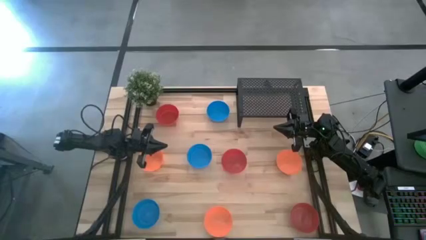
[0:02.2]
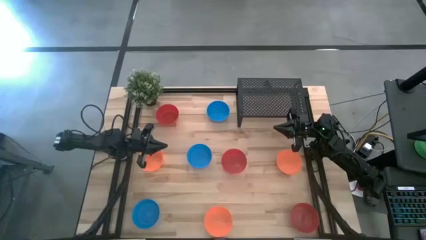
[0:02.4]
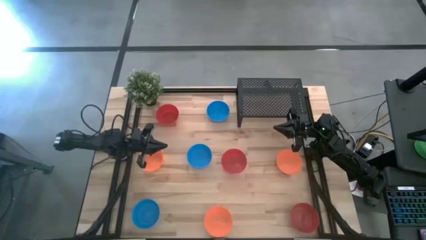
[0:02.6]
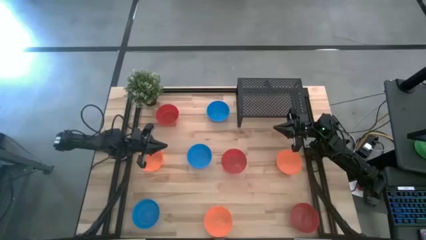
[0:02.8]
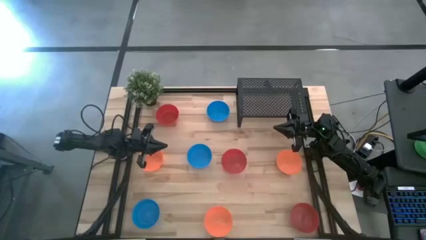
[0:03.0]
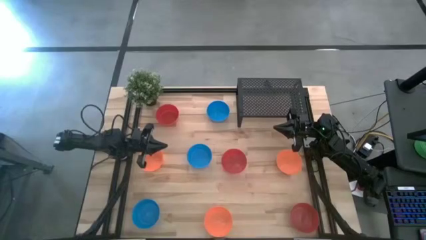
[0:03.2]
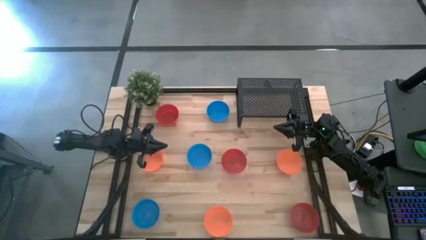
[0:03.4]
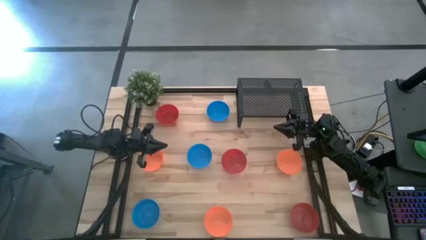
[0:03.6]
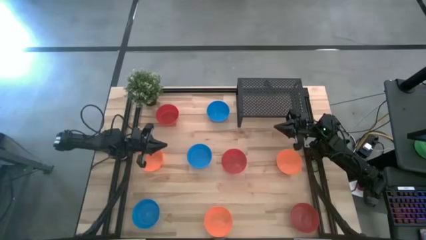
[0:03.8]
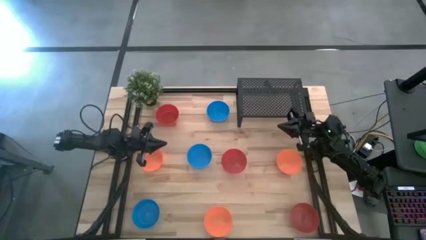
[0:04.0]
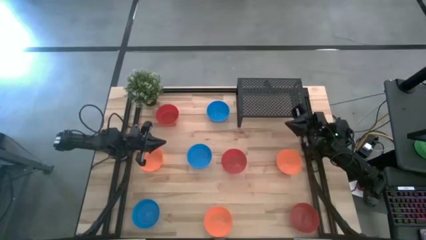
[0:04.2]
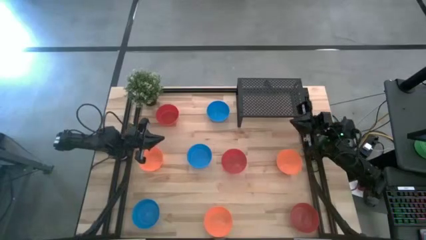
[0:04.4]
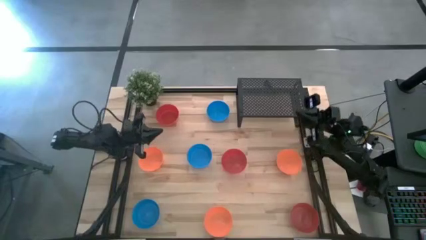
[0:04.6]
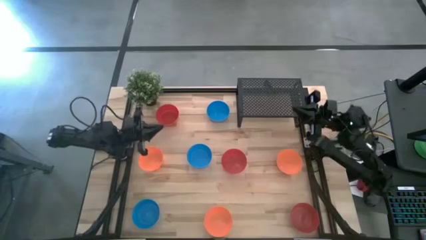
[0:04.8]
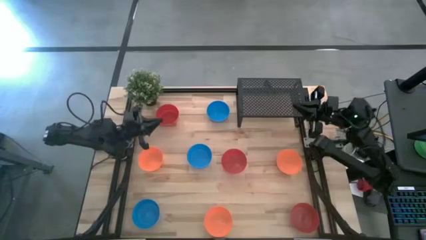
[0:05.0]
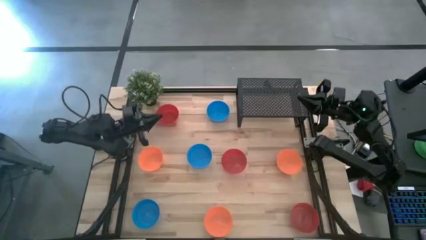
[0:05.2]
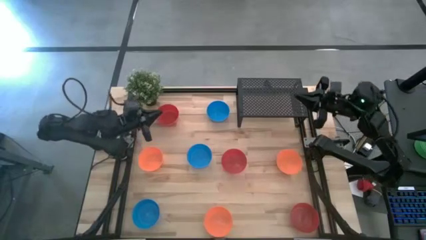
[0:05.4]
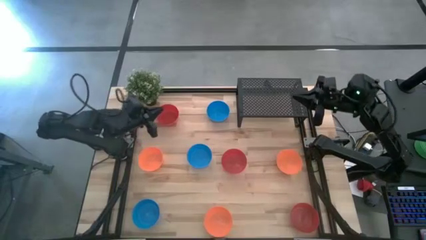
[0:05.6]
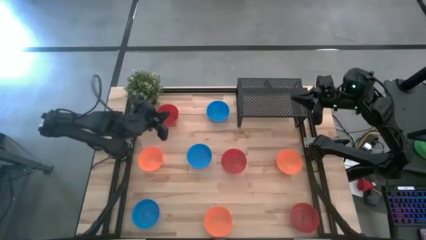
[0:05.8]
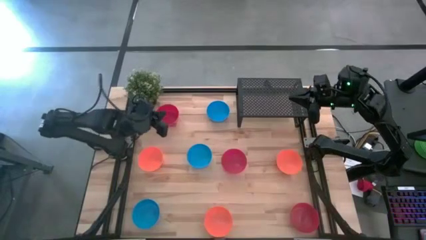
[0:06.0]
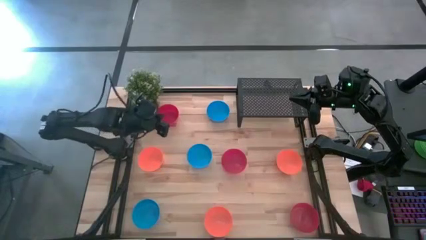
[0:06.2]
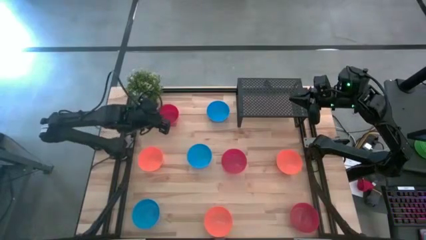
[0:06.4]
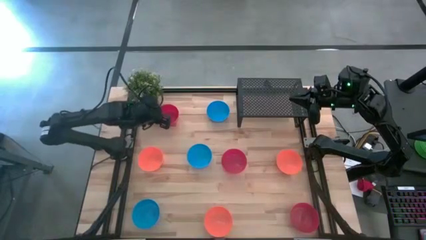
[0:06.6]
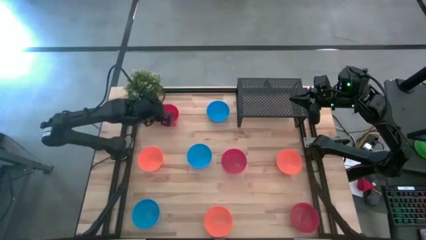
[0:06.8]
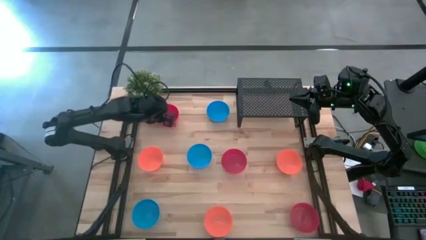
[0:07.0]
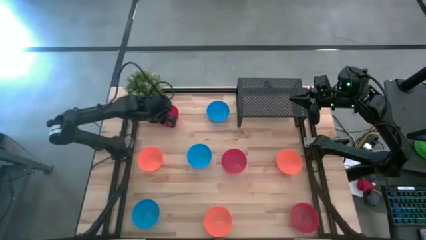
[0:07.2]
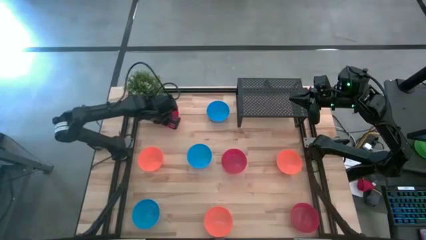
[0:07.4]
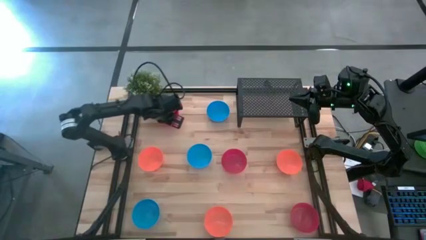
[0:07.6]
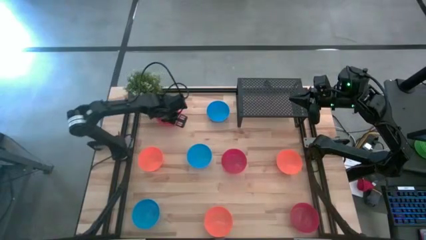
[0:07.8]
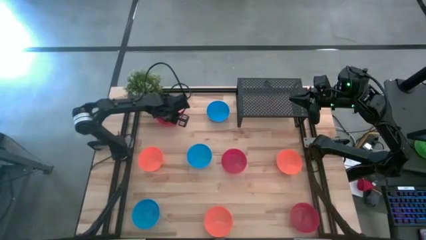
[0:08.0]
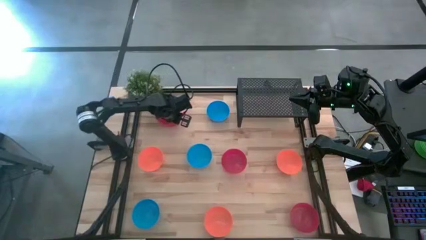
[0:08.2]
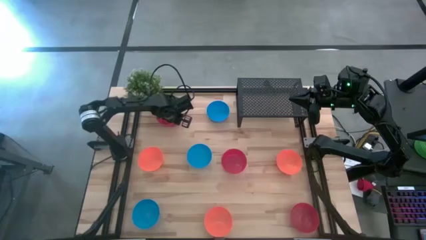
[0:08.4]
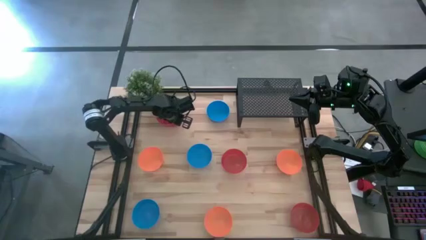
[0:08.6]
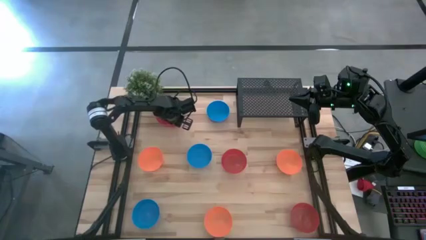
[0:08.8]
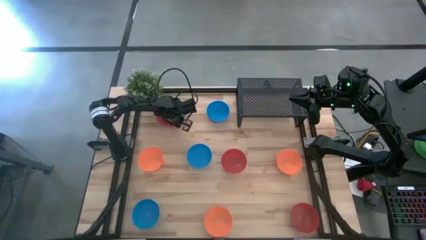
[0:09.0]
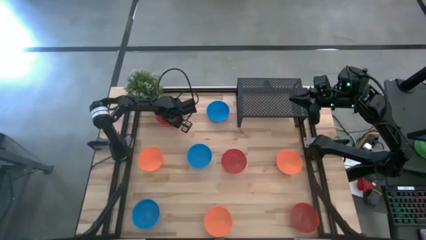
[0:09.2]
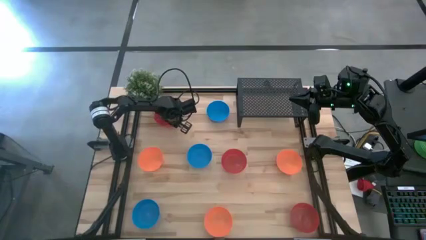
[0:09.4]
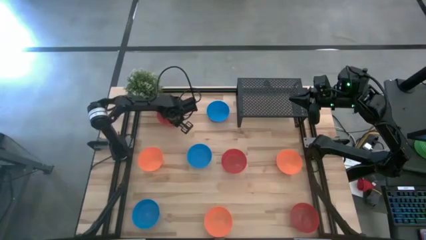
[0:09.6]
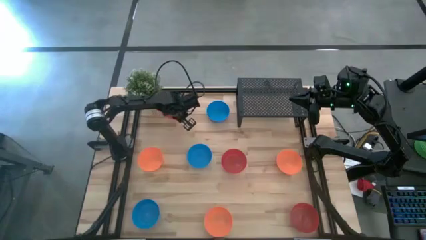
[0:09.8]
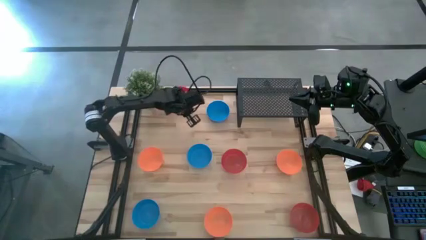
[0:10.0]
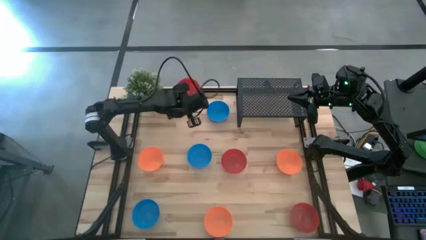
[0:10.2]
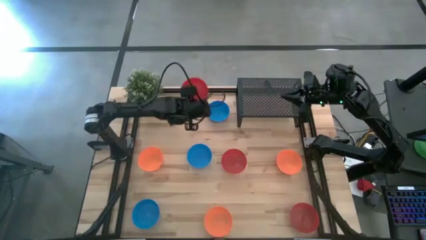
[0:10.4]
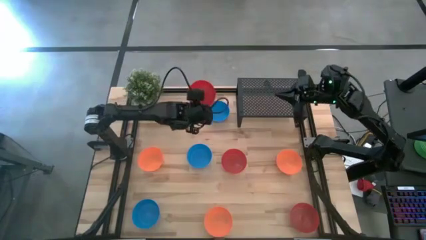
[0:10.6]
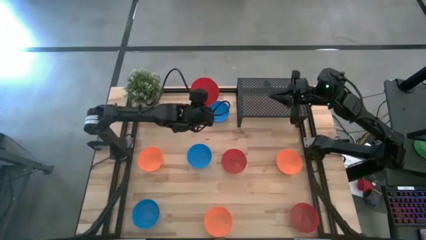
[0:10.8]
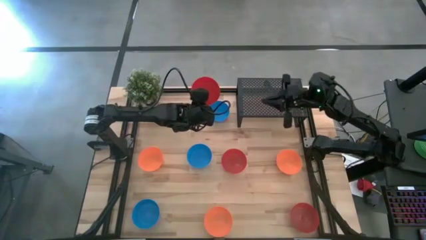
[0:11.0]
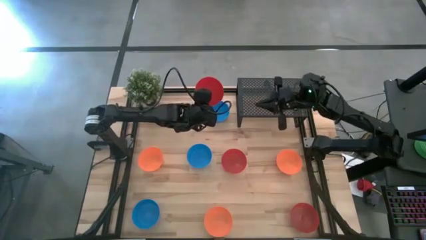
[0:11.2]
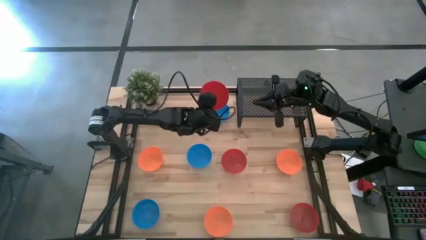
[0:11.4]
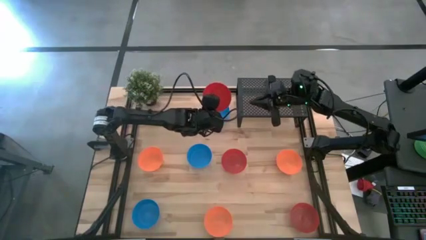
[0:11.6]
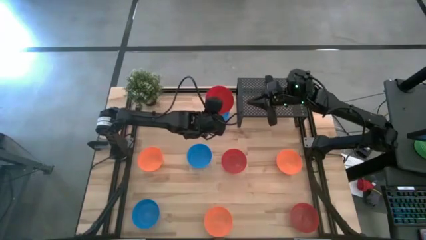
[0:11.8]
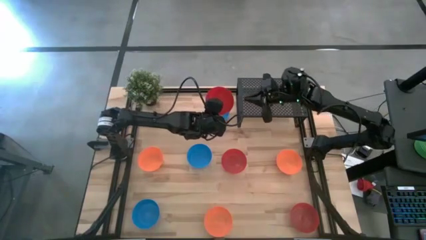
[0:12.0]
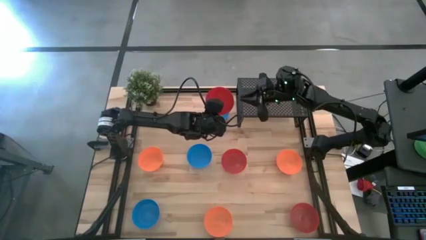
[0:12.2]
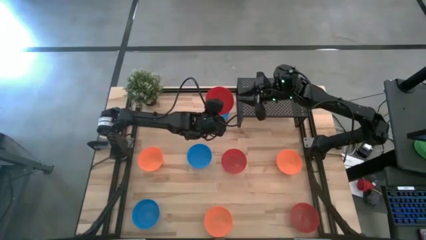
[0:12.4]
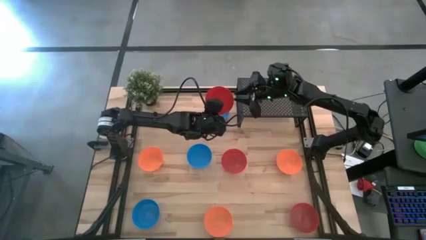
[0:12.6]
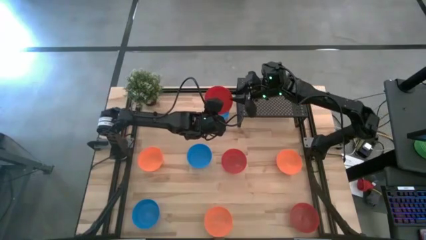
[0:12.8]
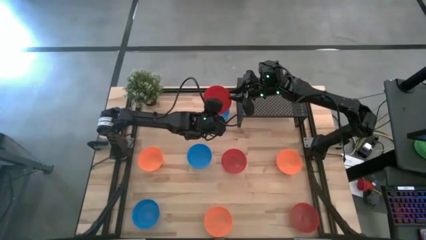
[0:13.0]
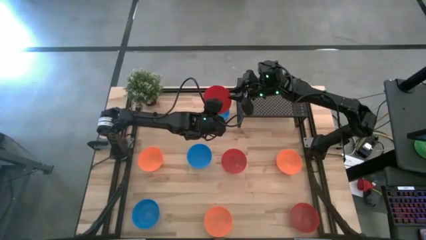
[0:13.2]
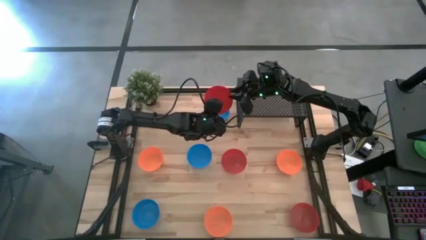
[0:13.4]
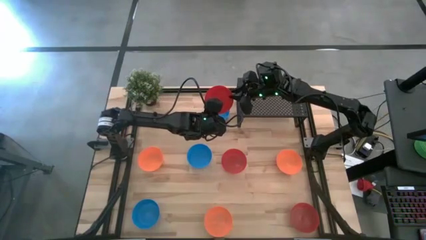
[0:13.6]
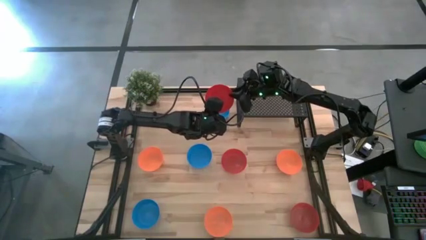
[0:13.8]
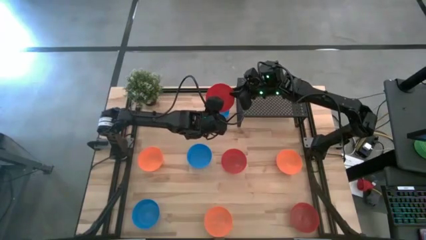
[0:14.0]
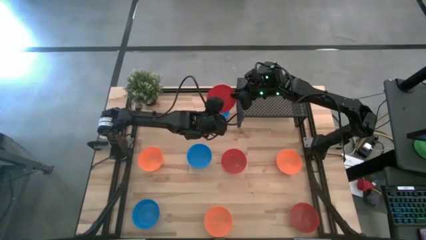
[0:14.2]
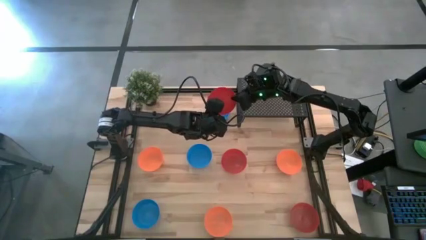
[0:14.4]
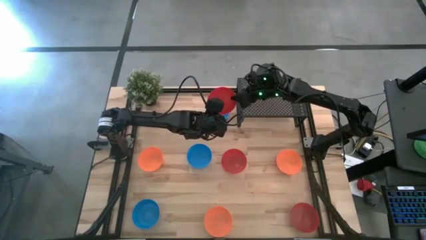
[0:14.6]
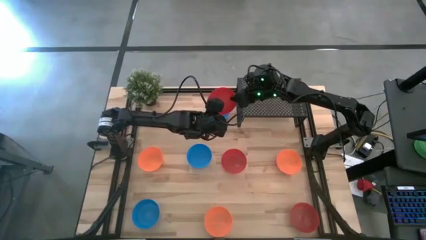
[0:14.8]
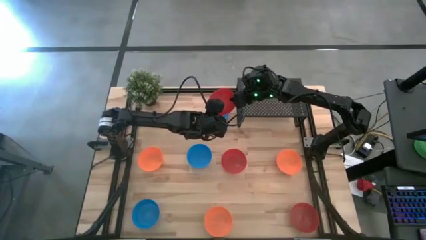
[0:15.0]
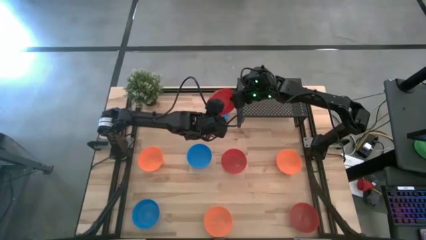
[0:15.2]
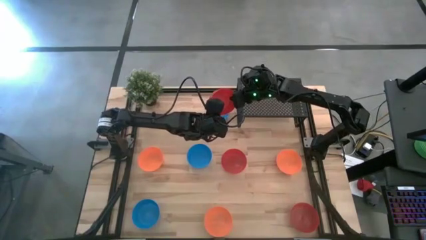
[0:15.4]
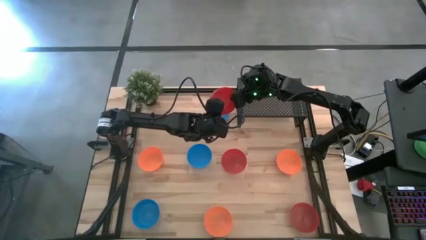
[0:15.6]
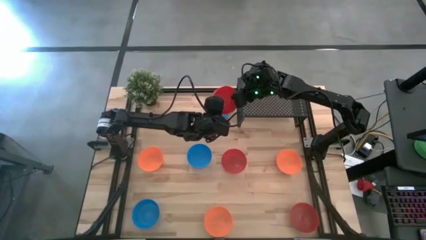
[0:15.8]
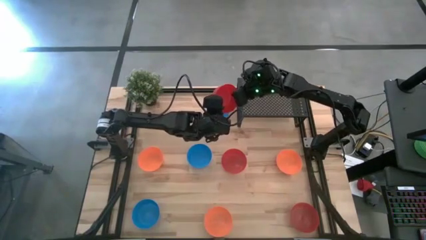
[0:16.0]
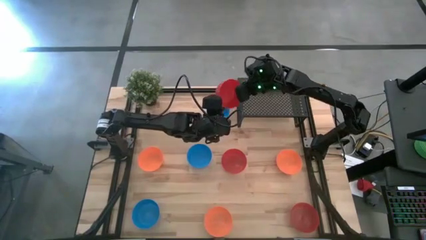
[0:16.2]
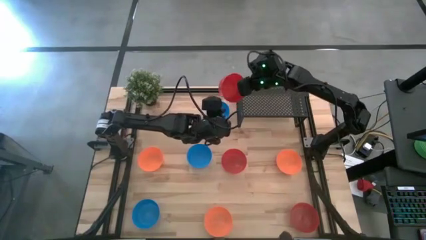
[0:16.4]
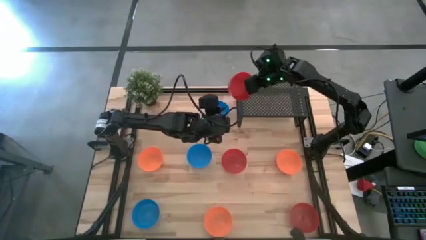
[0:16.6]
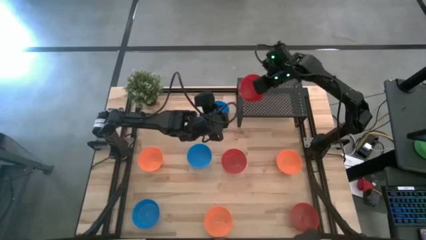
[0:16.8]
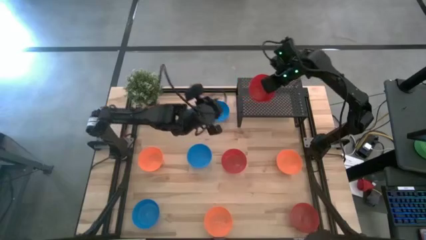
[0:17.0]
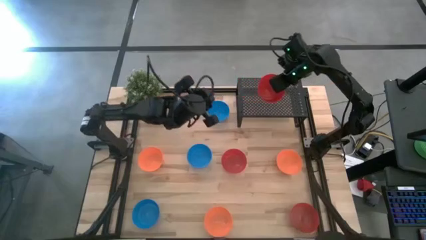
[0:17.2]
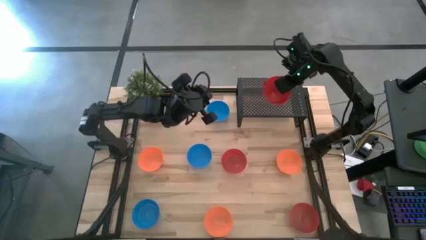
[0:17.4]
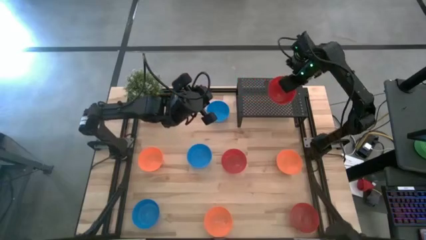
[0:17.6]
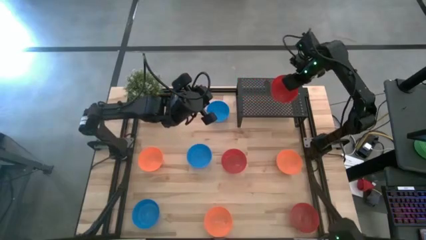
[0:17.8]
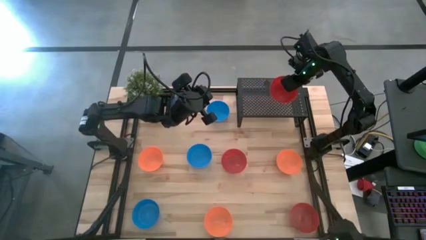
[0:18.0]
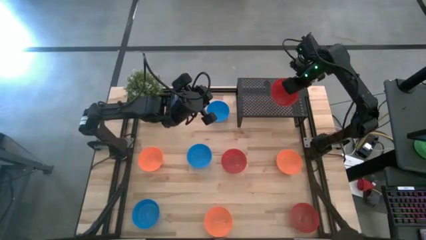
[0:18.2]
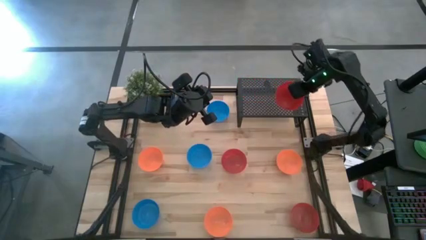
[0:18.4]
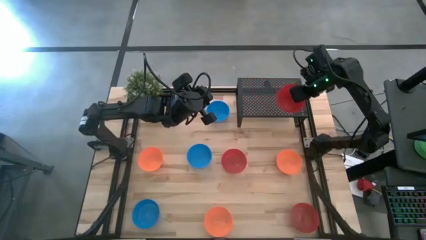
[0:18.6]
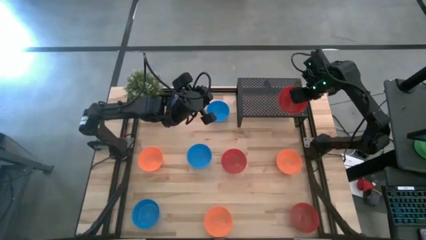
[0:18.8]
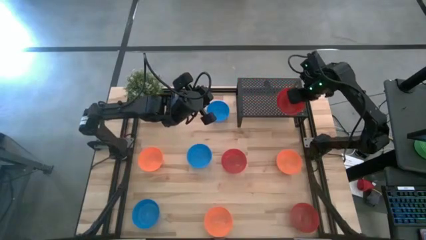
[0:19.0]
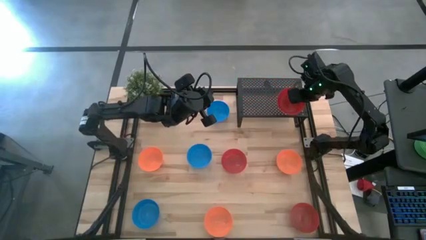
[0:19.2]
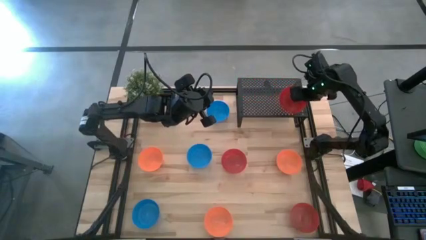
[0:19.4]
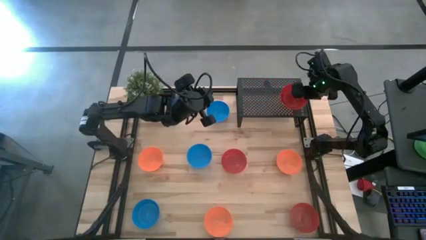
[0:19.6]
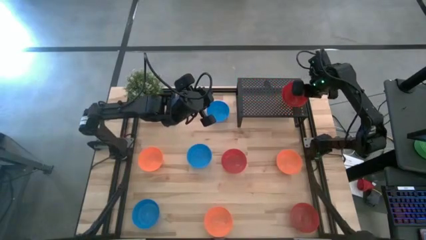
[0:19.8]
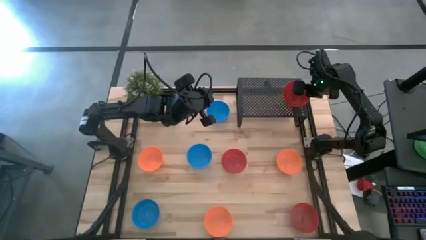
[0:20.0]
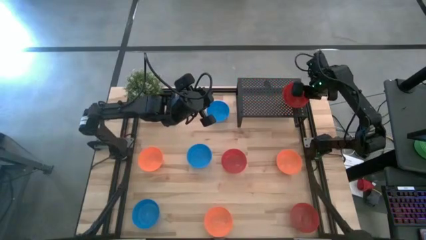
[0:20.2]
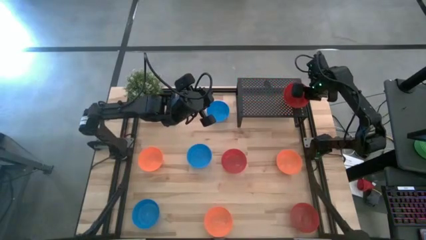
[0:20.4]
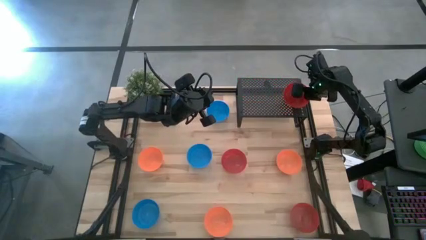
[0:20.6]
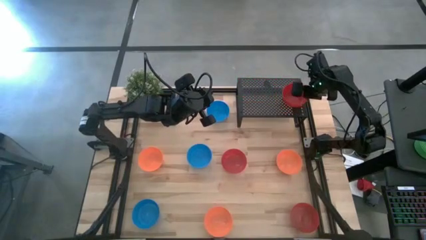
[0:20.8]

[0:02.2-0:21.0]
Task: Pick & Place Mini bowls
Put the top red bowl on the shelf
